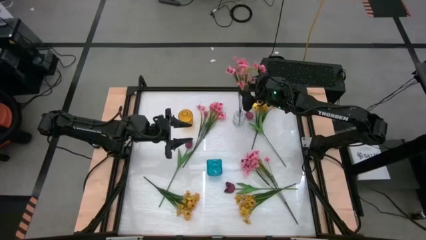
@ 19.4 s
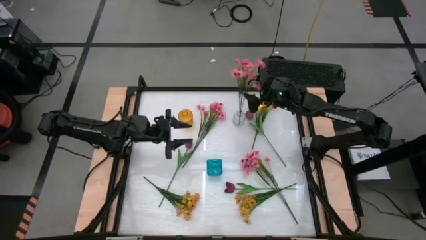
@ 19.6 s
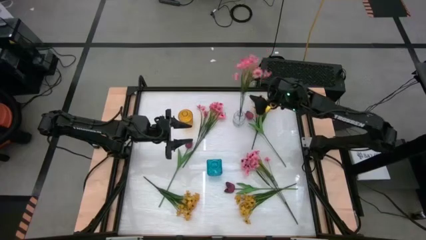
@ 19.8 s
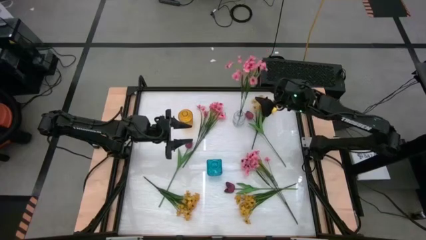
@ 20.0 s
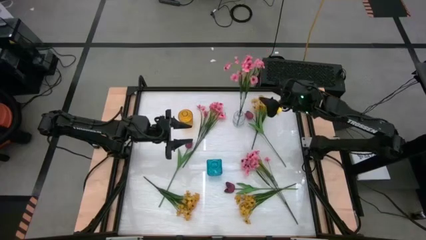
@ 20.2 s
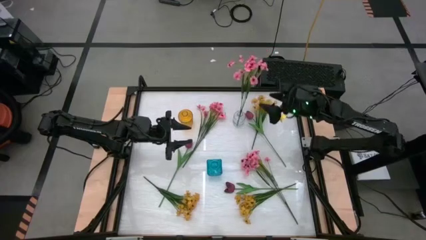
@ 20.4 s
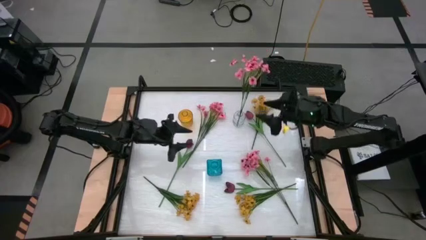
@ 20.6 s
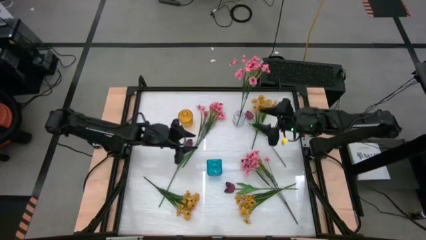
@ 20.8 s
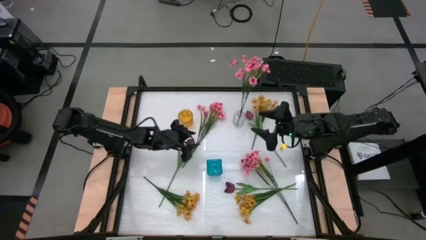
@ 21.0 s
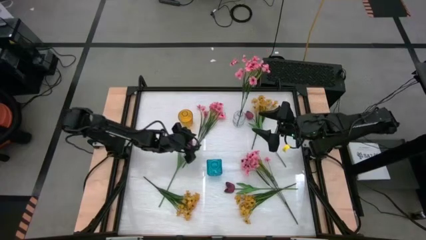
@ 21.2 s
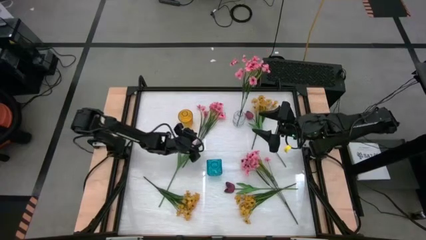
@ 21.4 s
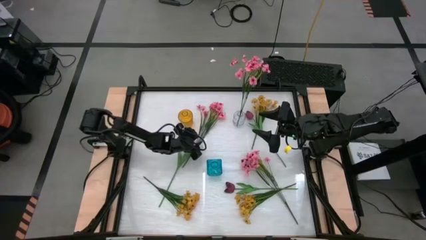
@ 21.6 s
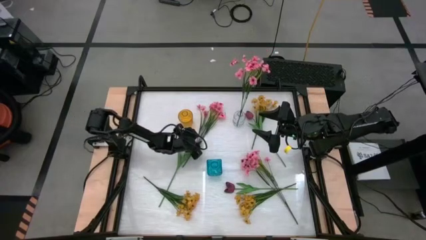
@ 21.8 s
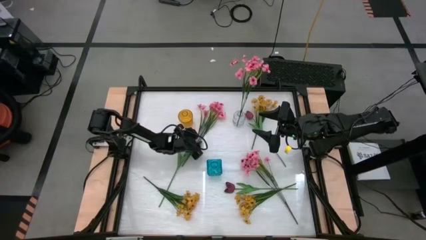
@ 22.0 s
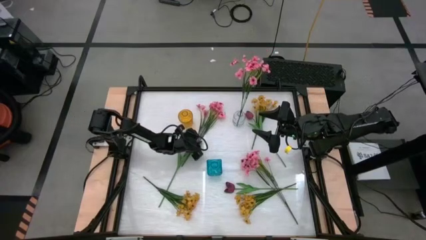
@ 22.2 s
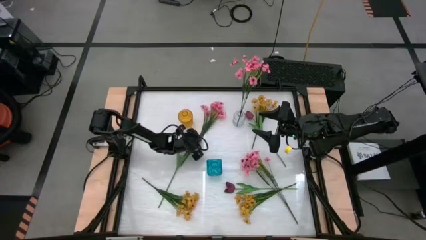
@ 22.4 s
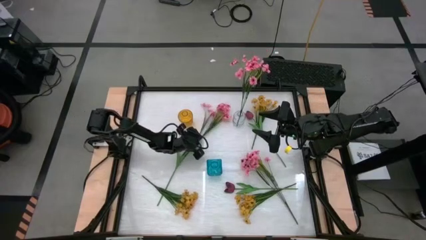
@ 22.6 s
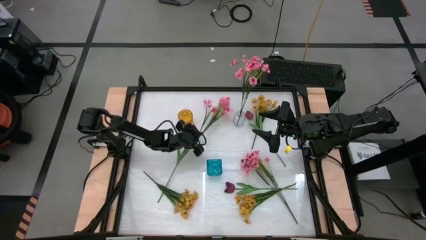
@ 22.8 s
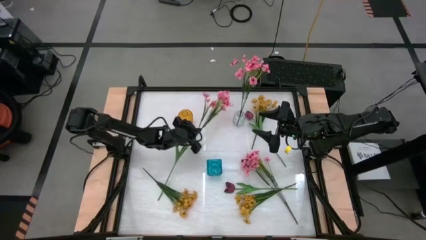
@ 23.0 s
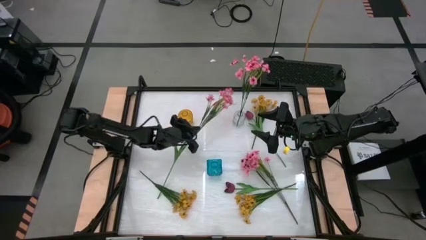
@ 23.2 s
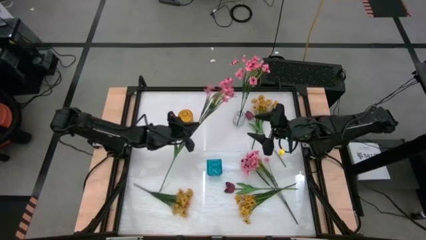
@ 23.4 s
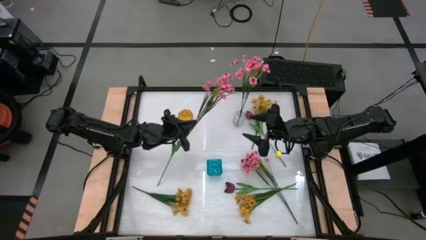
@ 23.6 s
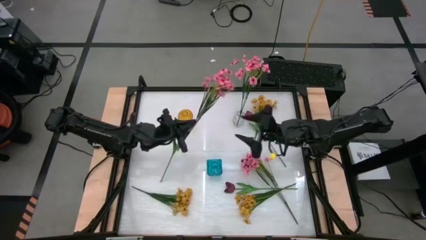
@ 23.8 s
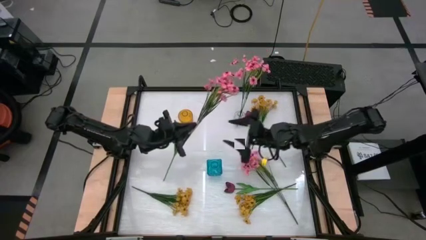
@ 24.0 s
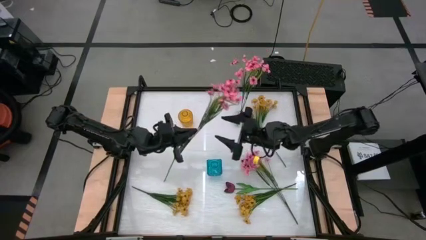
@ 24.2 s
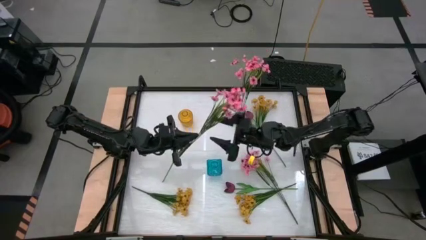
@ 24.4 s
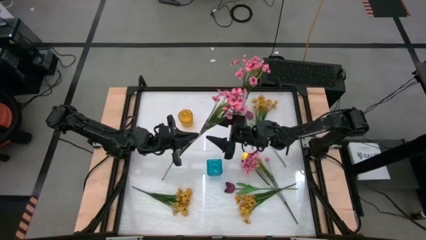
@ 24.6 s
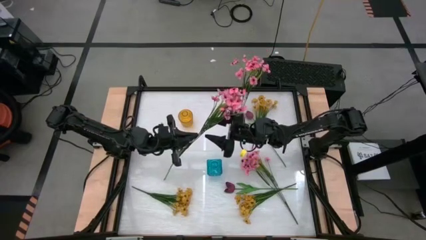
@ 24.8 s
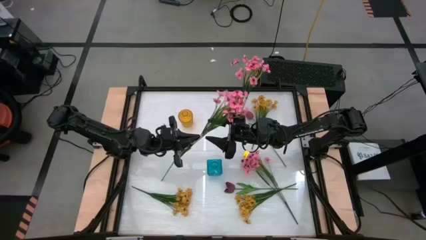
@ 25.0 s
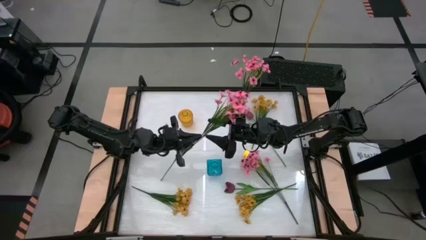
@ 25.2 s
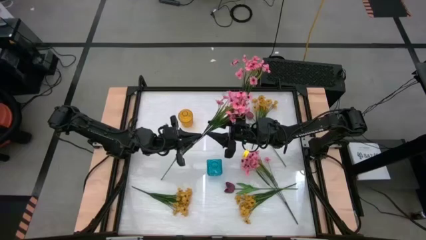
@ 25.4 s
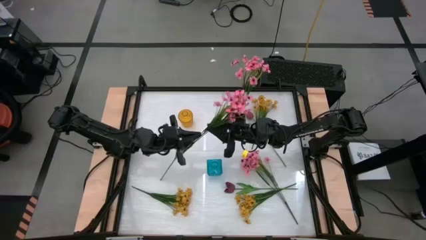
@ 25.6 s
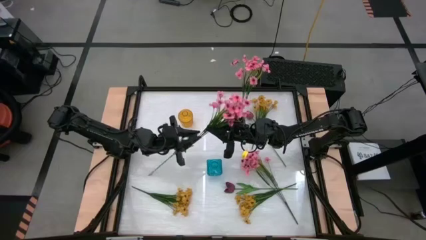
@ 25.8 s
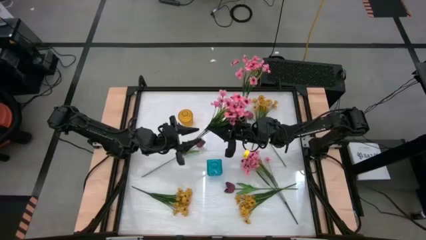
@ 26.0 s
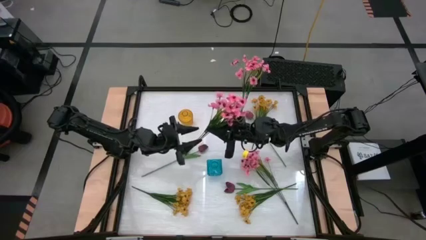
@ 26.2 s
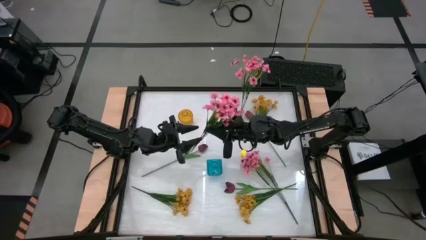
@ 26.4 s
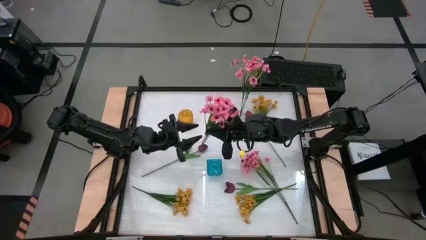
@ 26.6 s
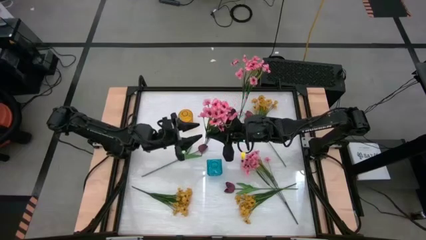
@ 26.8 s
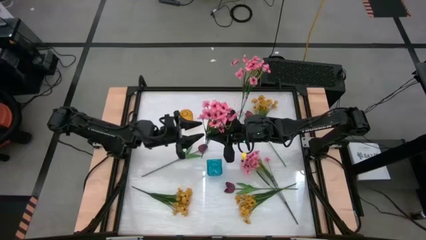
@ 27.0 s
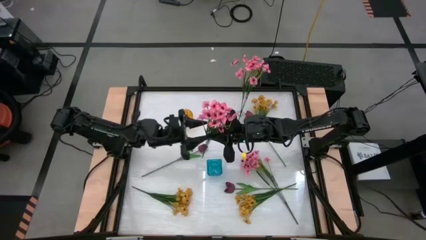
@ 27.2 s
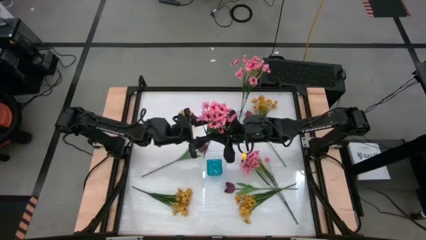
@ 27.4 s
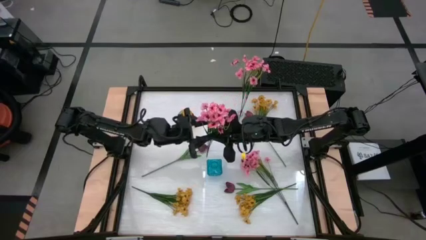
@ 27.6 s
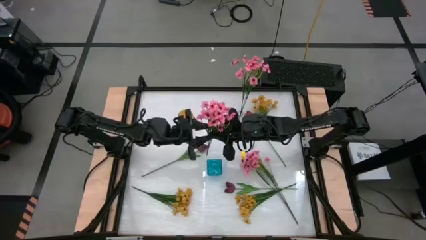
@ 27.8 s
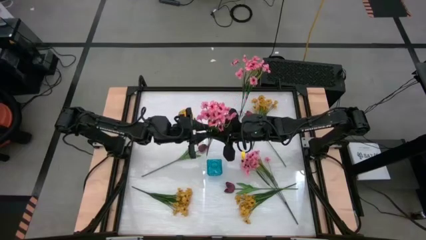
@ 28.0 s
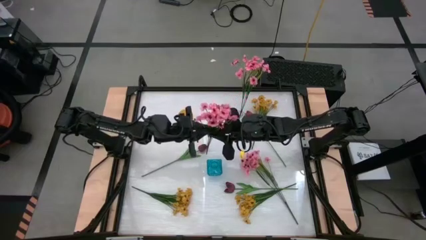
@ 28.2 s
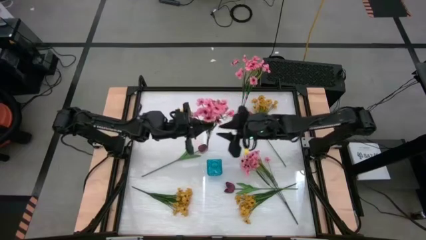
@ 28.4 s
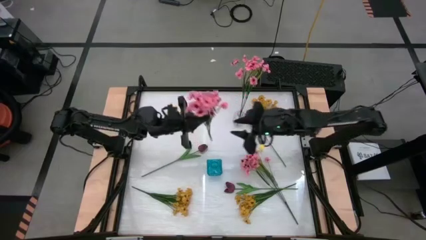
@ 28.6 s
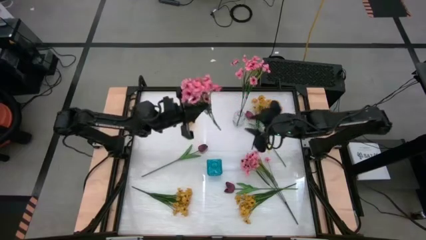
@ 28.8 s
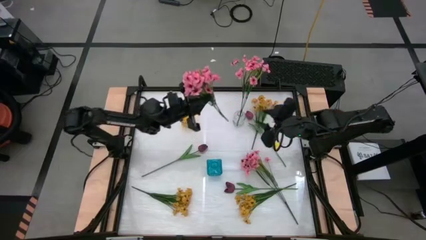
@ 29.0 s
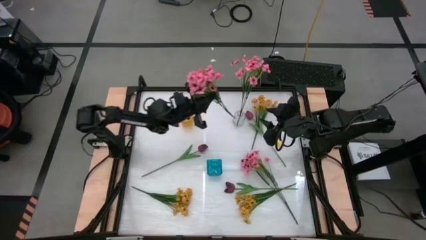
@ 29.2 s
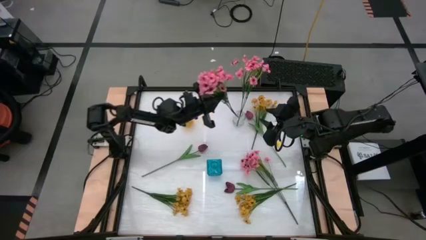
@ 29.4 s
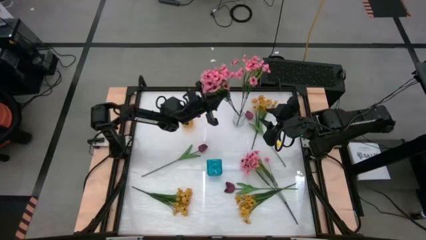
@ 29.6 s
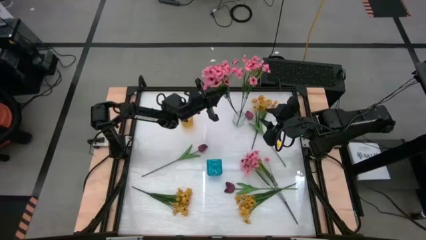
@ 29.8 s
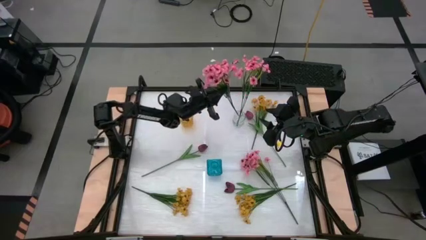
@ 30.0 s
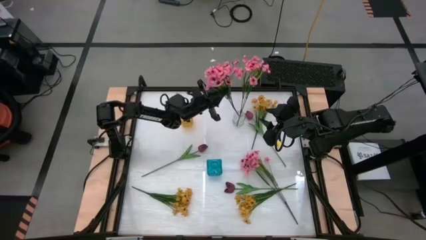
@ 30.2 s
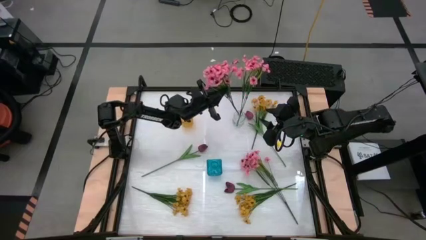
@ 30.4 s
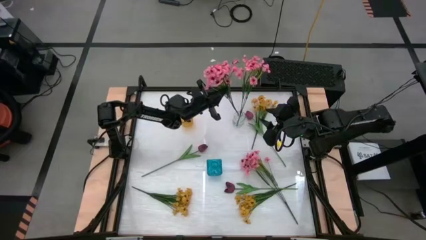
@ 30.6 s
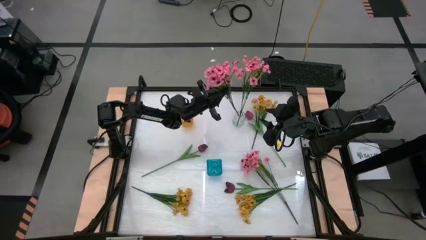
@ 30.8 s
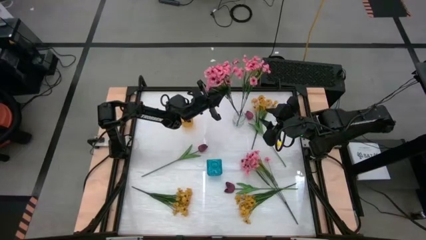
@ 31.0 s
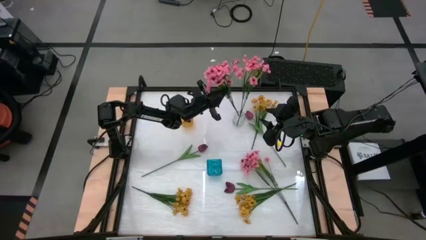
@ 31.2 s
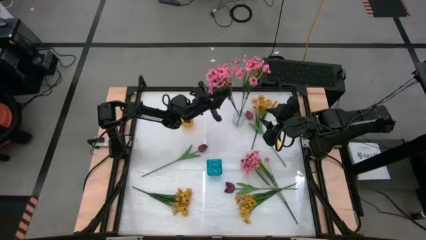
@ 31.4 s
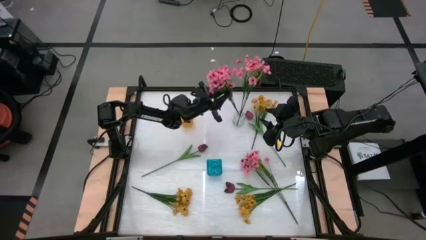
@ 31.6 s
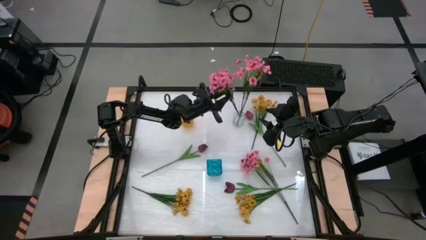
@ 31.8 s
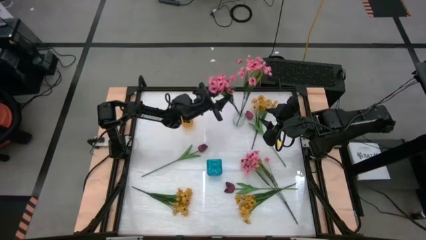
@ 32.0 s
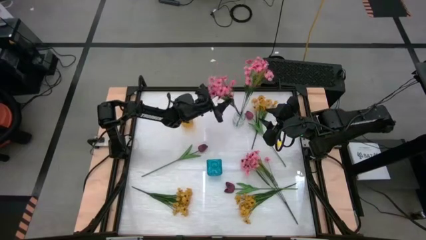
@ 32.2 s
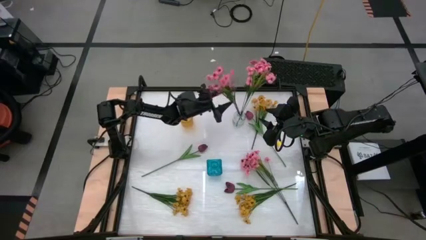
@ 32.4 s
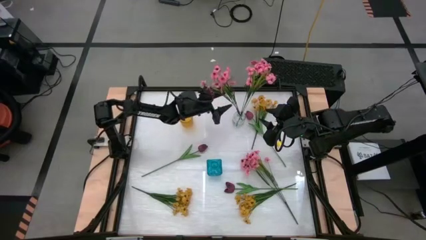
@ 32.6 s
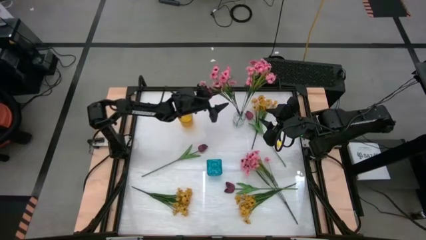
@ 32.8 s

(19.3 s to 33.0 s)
Task: Sort flowers into vase by color
Put the top pink flower into the transparent vase
